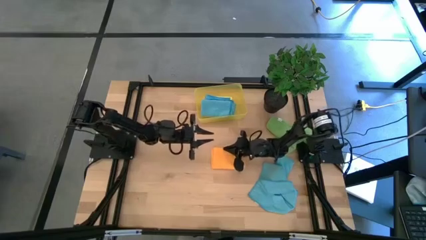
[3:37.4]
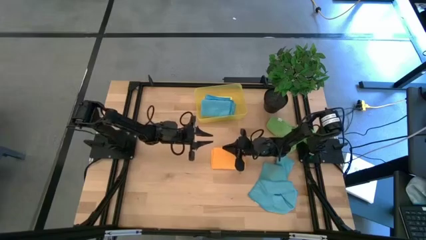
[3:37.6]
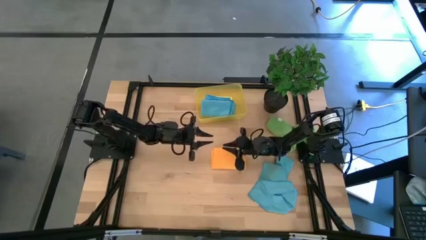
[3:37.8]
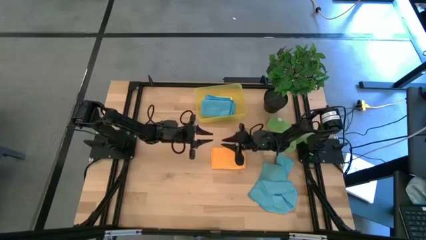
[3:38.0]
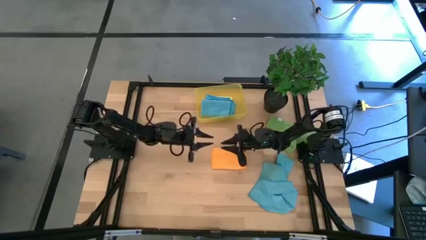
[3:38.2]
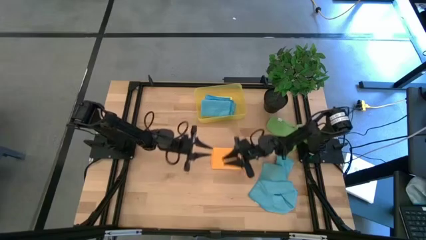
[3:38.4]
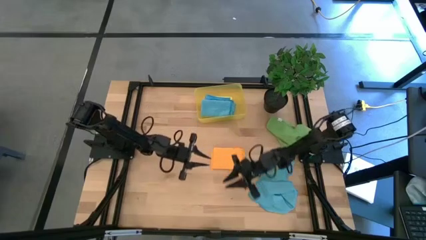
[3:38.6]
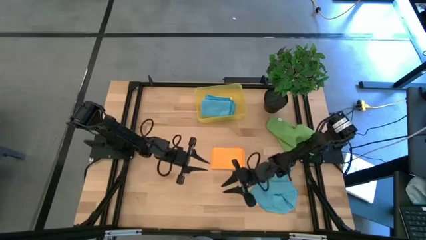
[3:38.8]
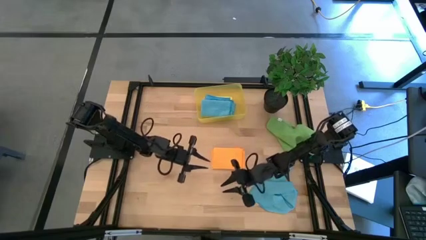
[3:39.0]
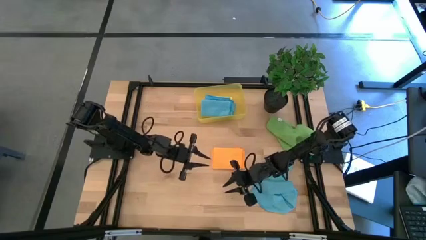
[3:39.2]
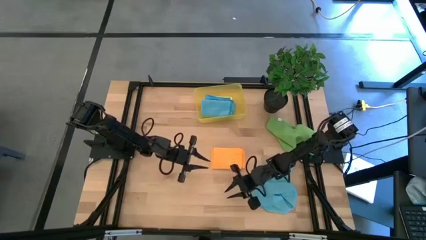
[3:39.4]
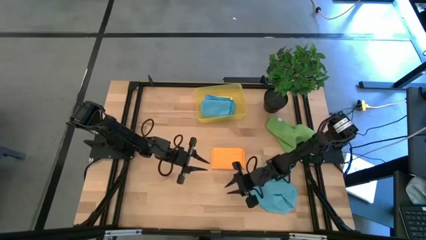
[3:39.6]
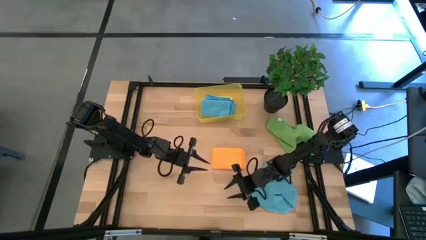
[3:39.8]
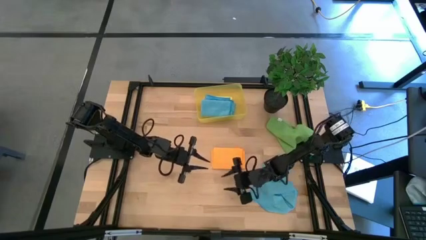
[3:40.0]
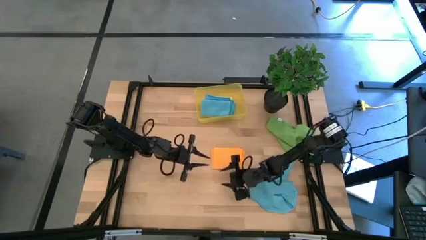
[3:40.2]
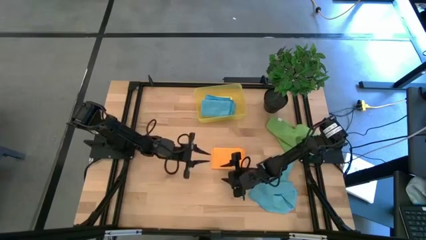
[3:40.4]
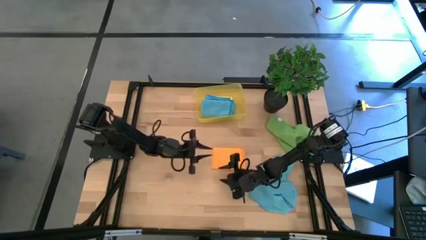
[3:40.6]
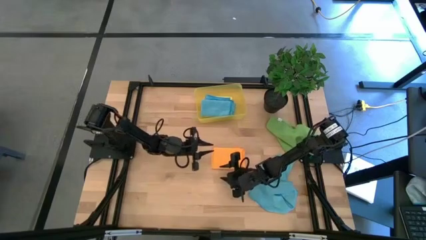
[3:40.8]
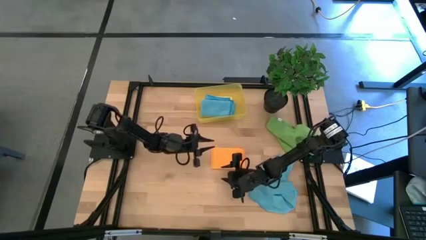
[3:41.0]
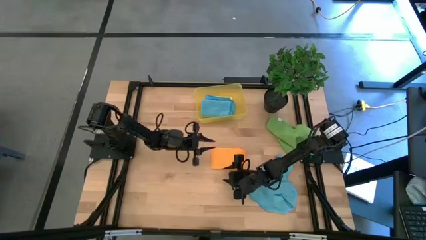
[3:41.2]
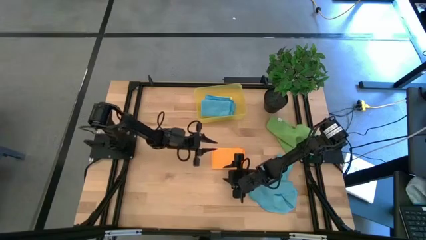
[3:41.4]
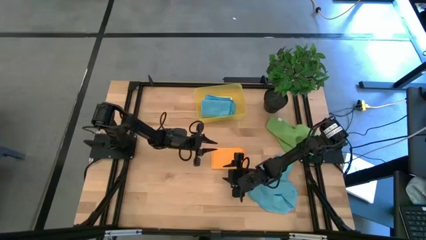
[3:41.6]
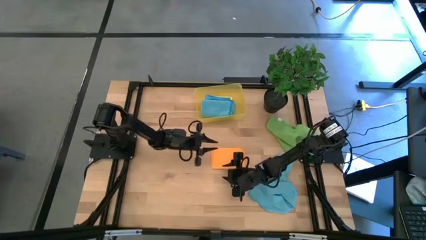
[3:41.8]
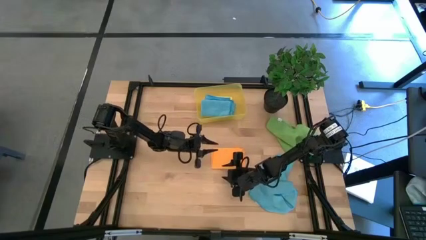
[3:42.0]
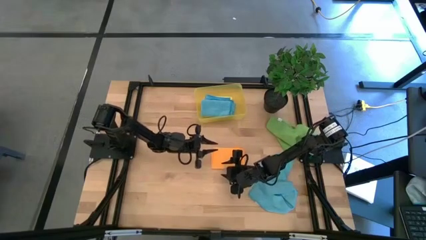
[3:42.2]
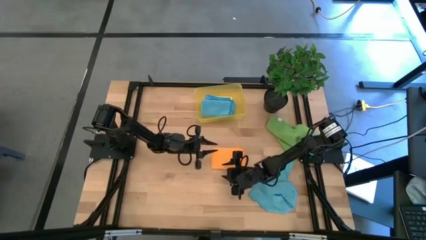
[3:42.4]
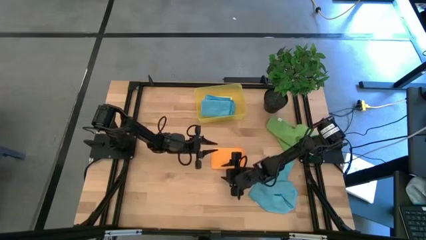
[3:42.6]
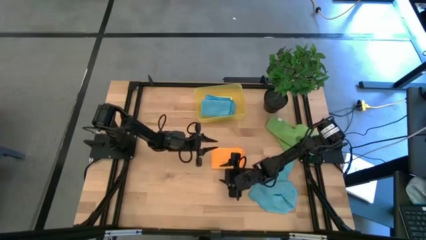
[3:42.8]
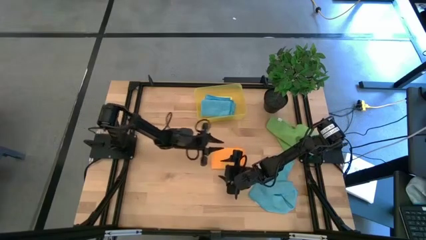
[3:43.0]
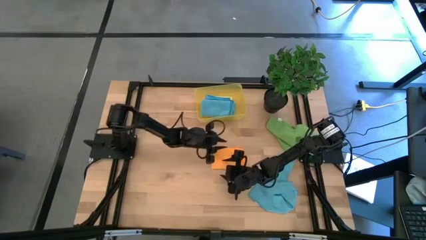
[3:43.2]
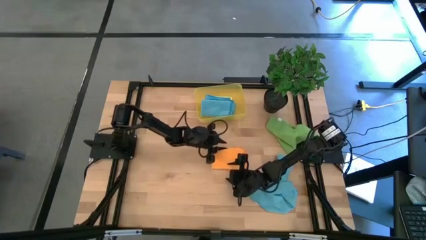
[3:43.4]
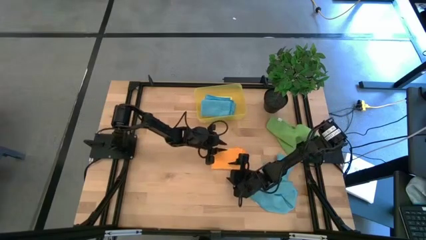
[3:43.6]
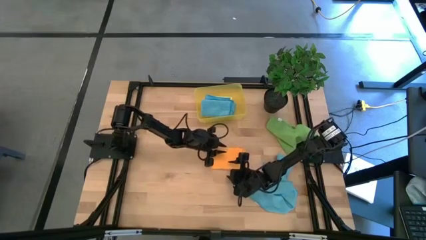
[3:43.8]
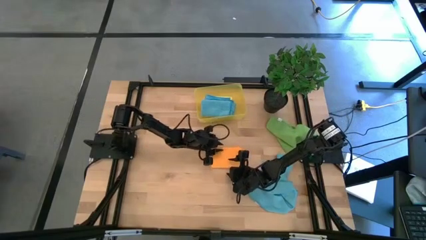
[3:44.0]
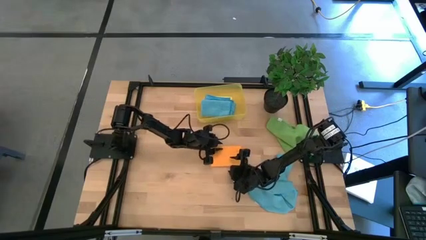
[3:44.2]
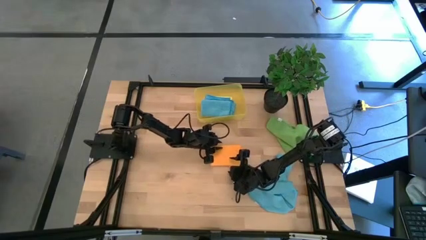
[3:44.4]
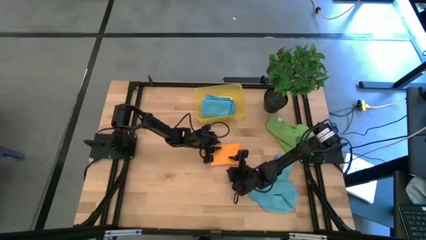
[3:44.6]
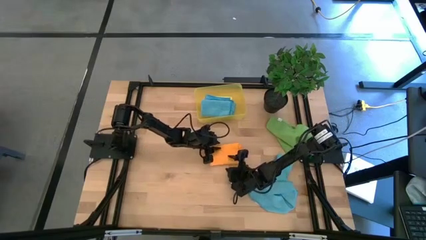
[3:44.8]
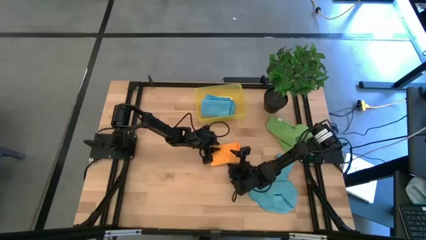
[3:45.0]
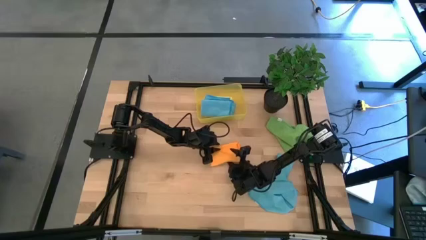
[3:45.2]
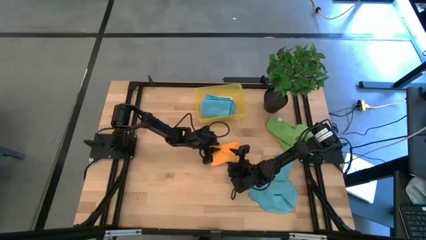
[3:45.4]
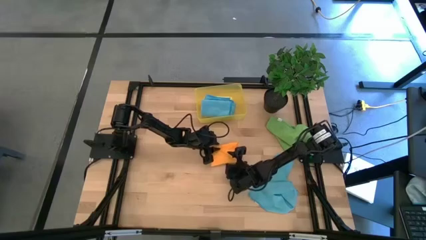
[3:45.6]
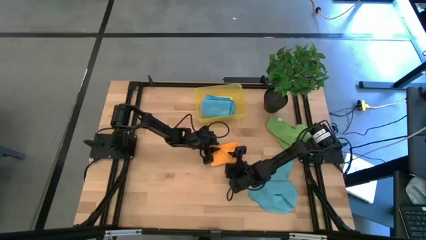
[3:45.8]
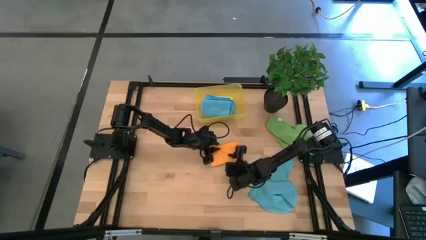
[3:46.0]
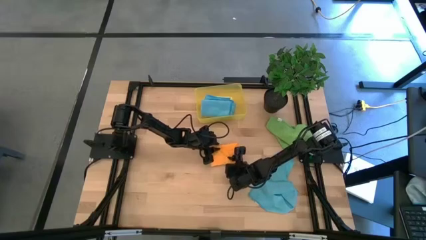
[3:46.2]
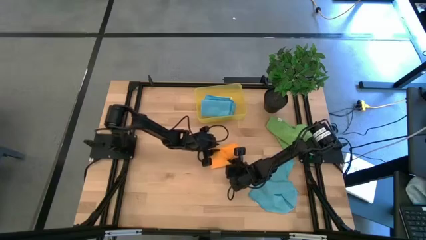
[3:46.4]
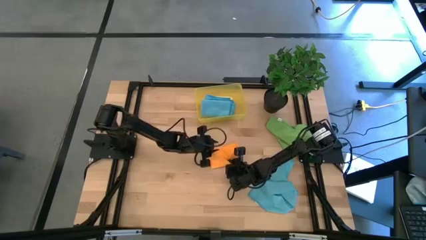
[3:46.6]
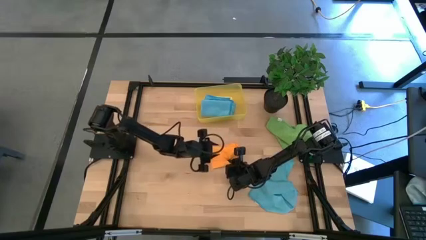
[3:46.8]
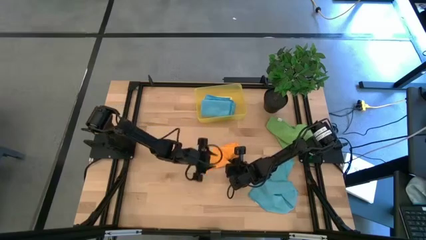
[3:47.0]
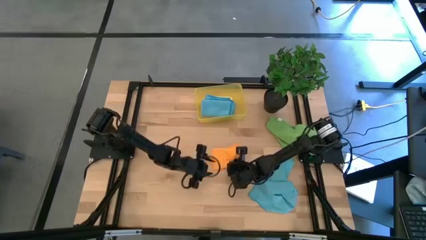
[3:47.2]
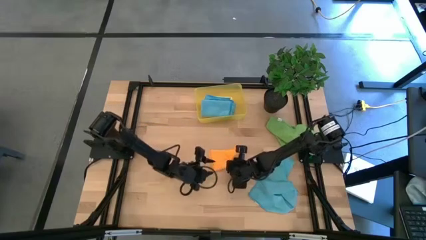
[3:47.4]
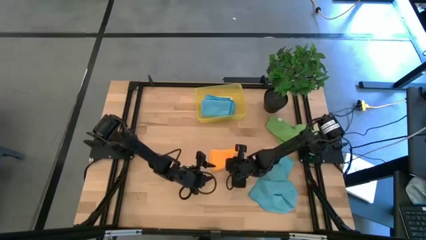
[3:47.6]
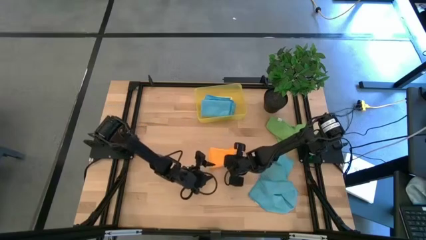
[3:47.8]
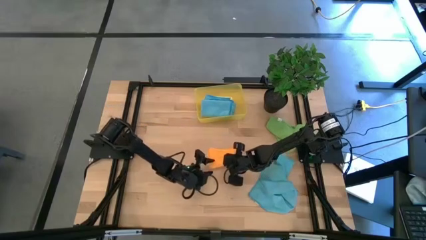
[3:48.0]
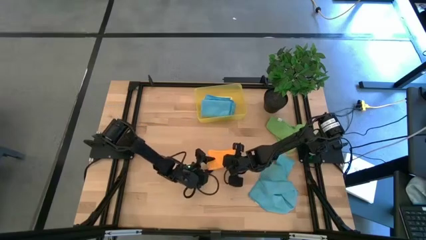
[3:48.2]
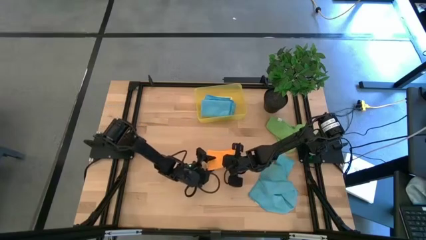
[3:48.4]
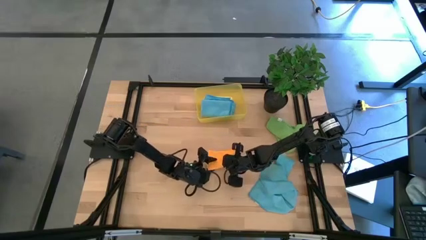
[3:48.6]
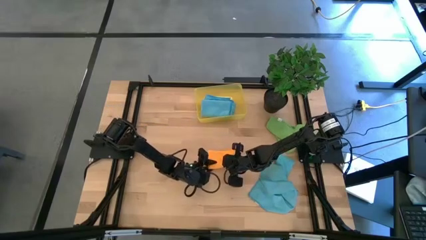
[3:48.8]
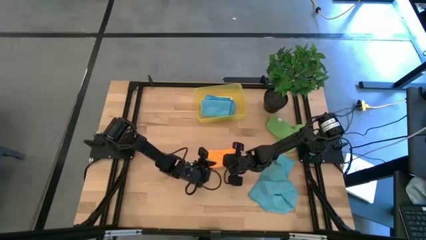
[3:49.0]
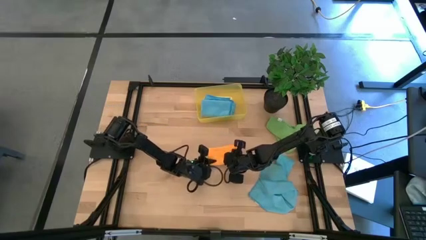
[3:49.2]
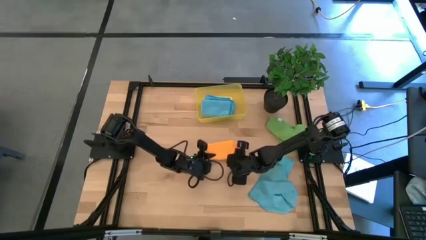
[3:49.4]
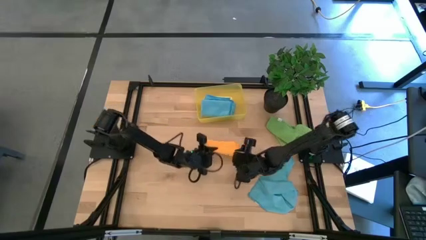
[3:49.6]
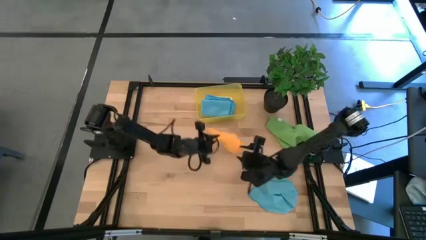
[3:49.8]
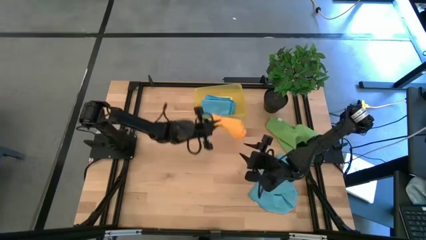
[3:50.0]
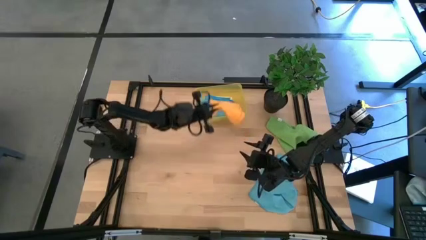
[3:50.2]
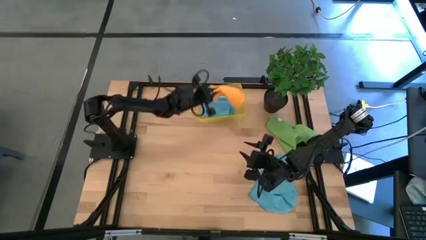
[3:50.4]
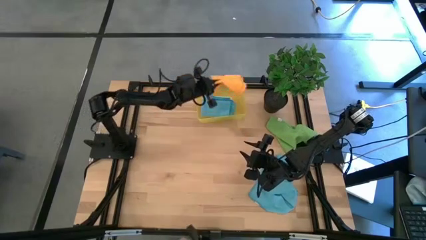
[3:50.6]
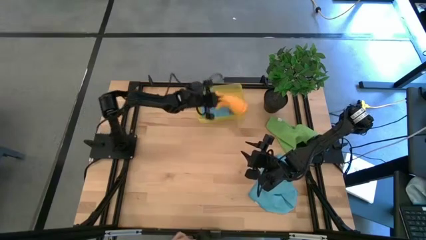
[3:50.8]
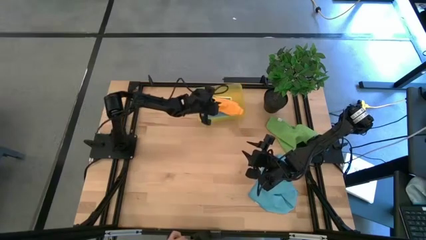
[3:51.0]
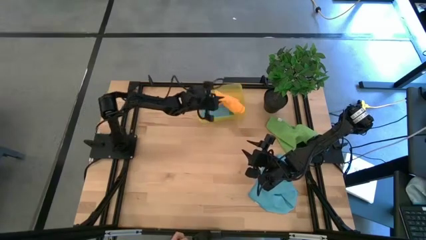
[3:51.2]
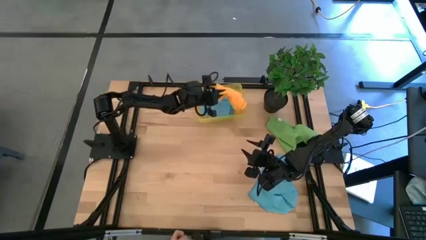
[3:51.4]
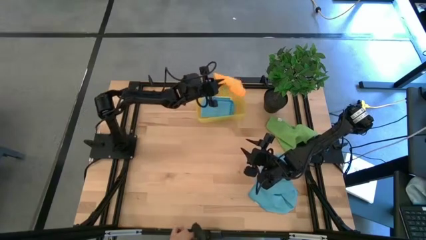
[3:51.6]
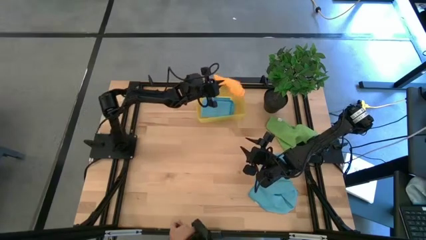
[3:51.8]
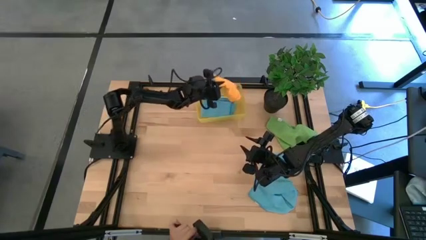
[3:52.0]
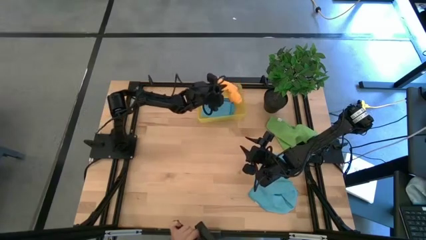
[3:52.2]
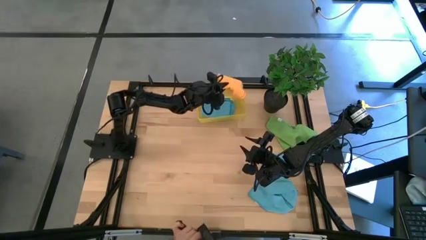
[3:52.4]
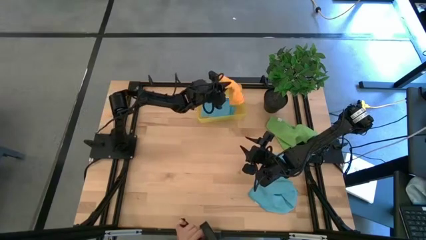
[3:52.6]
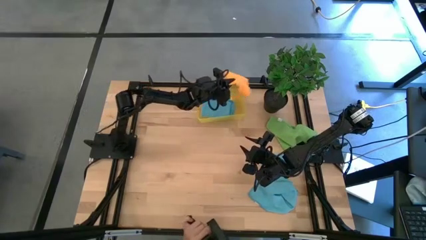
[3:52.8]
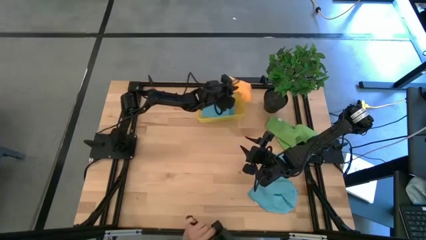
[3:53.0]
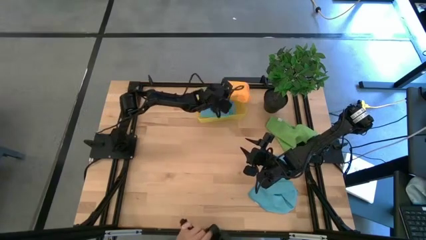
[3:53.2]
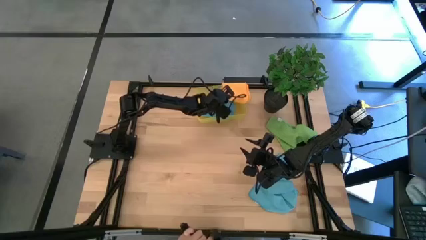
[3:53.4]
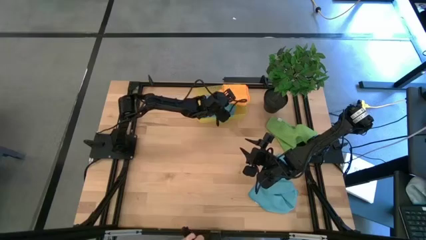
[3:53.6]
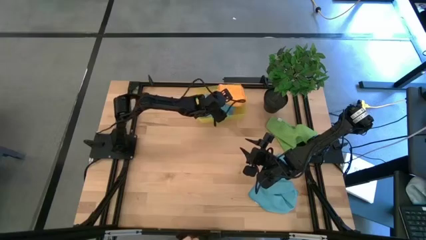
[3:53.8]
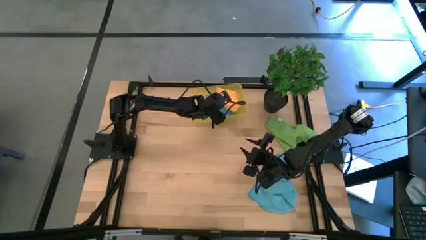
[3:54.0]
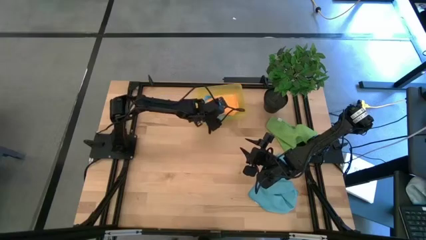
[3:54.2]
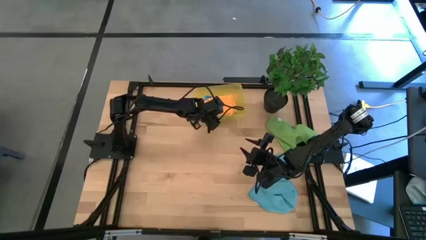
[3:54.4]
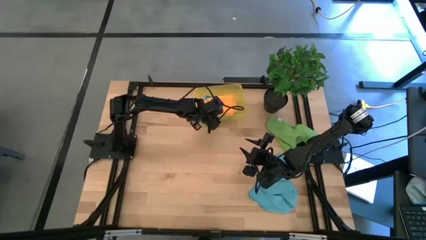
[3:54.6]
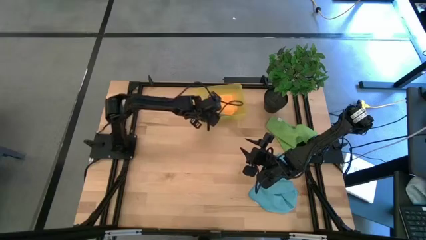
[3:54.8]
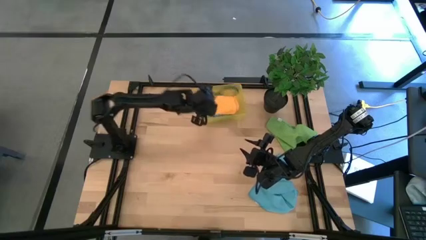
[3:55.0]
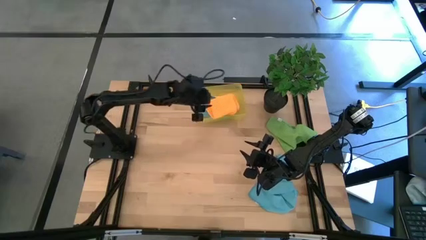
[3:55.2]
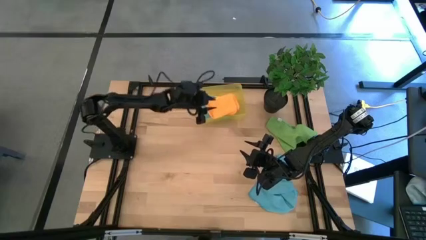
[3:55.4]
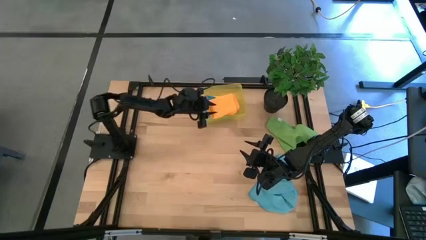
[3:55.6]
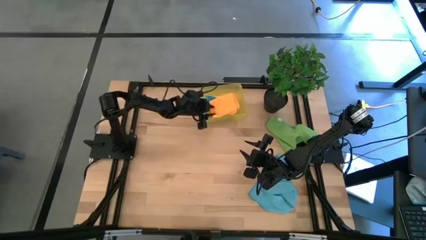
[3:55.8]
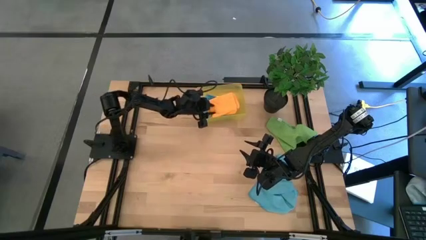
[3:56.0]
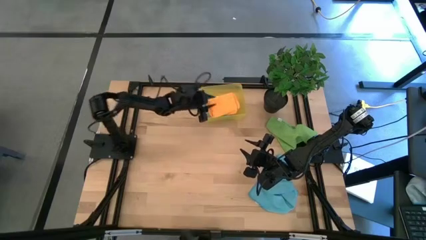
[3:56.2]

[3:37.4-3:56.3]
Task: Fold microfiber towels
Stack the folded orange microfiber towel on top of the orange microfiber towel in the bin
